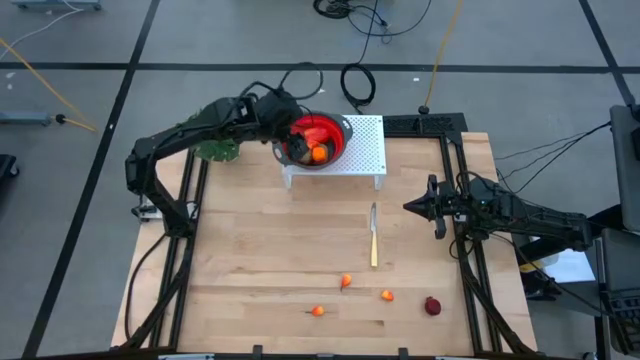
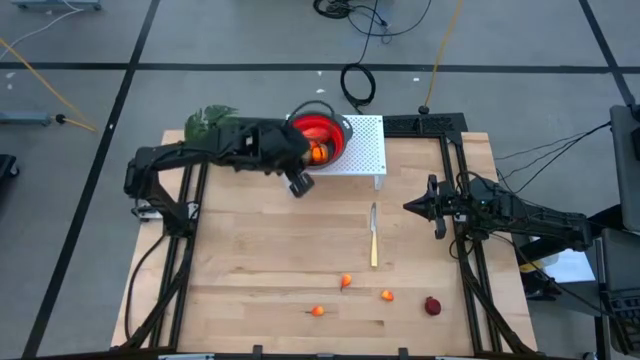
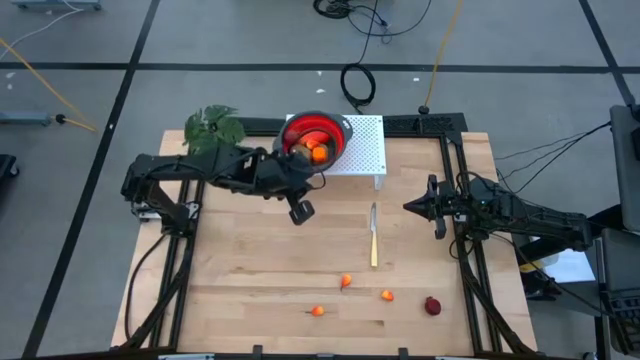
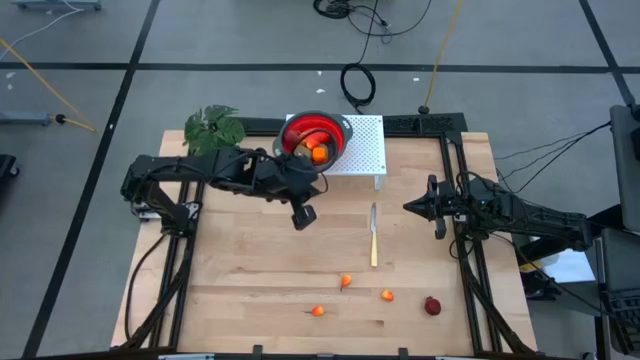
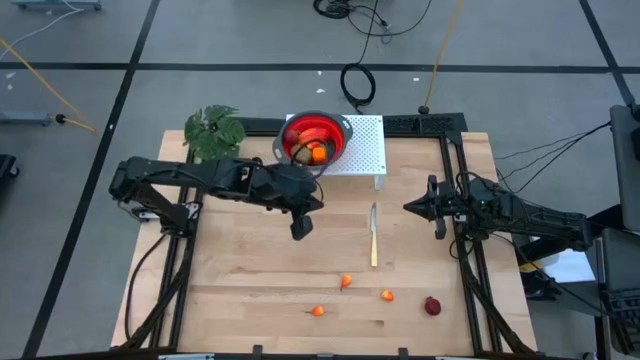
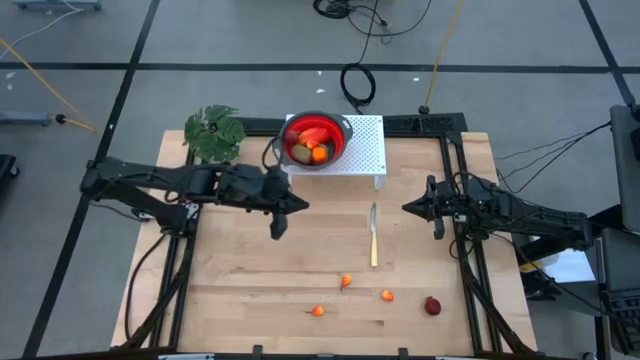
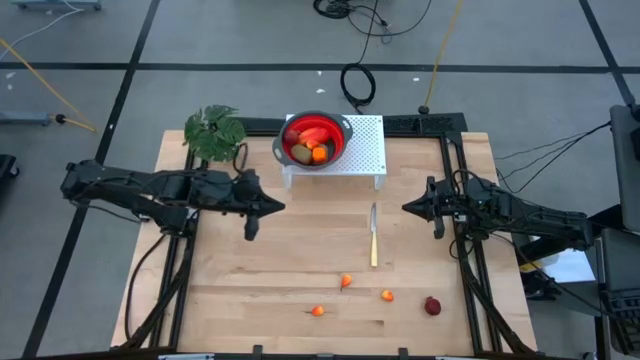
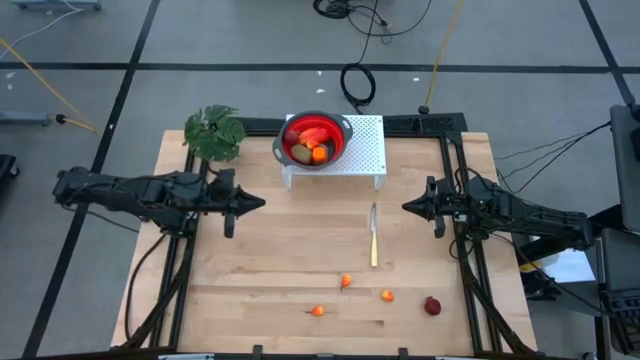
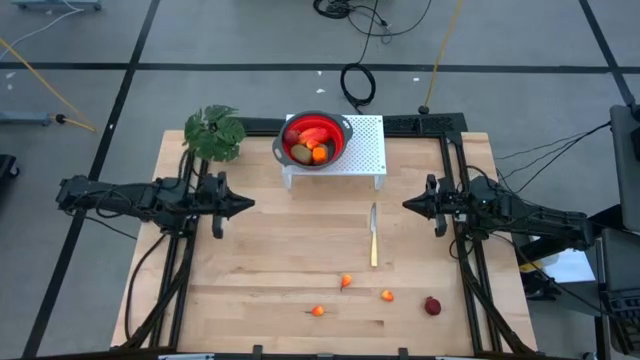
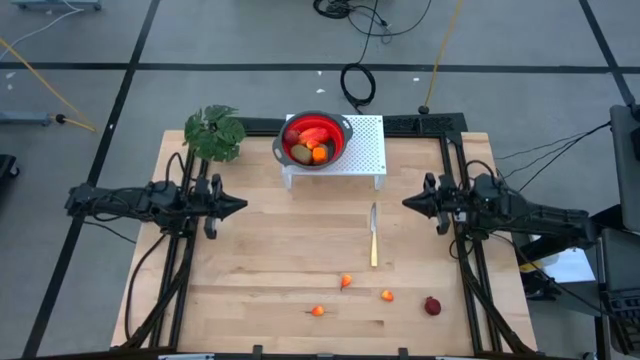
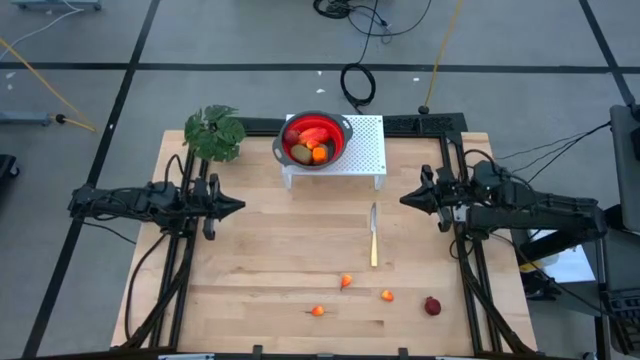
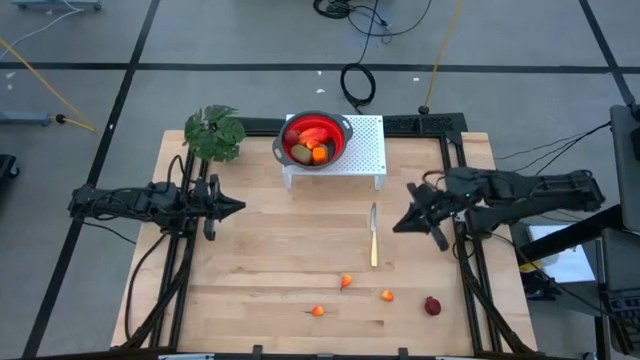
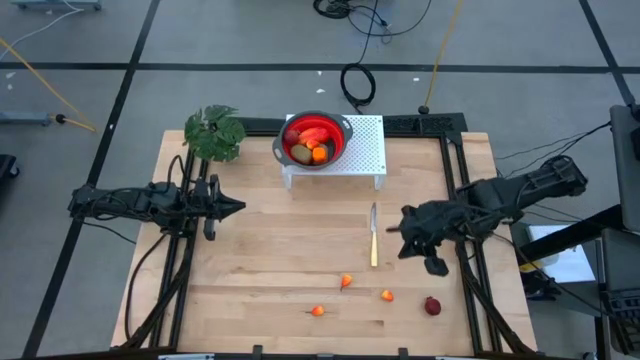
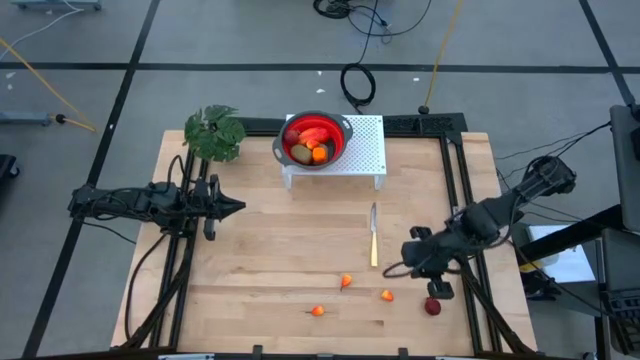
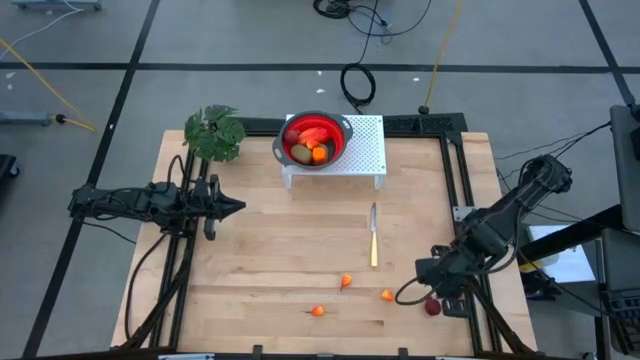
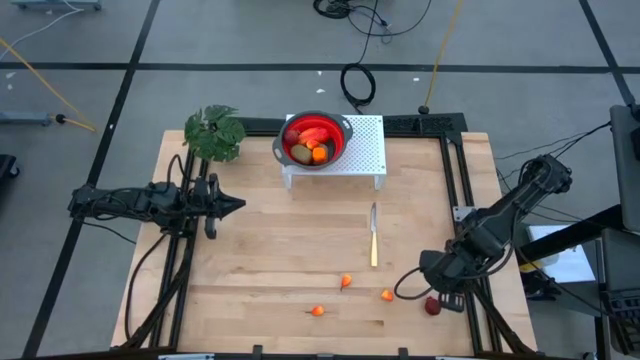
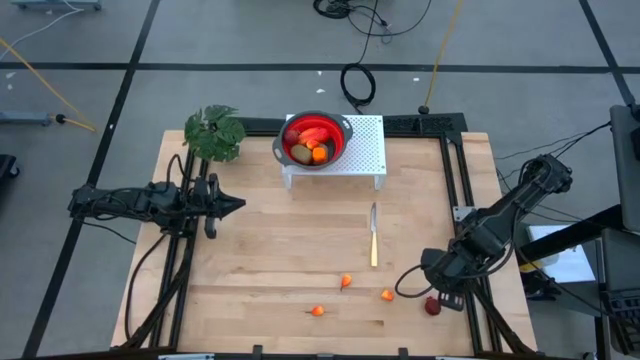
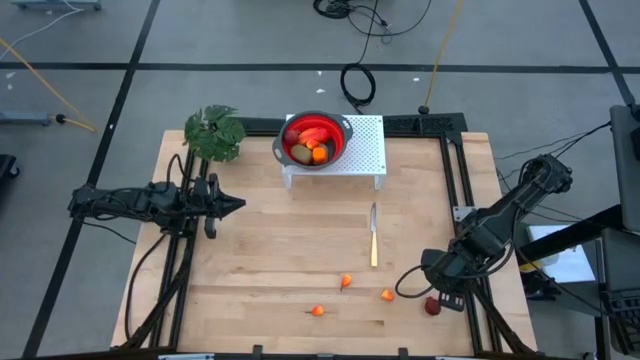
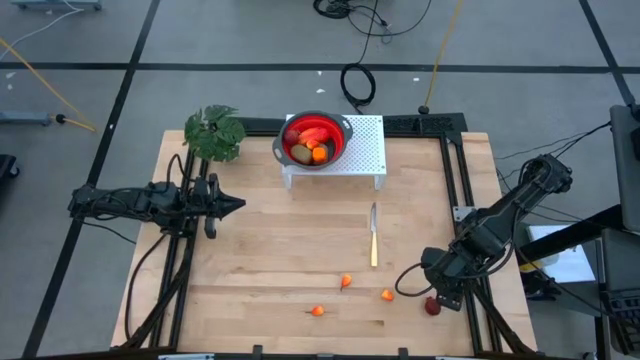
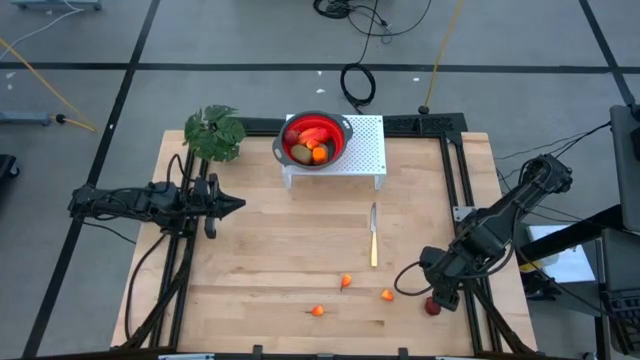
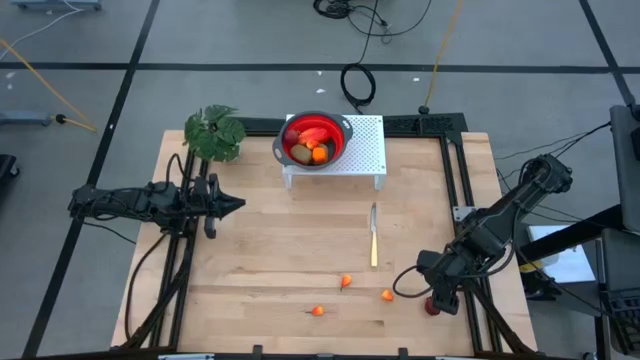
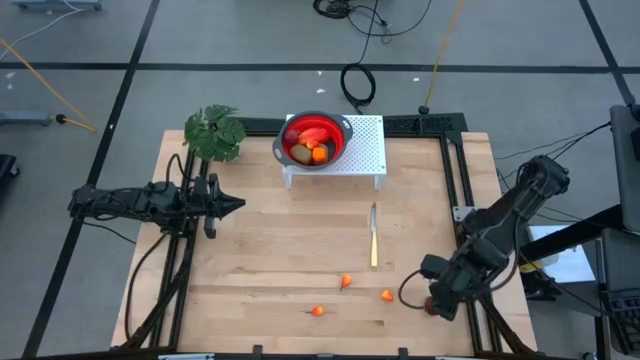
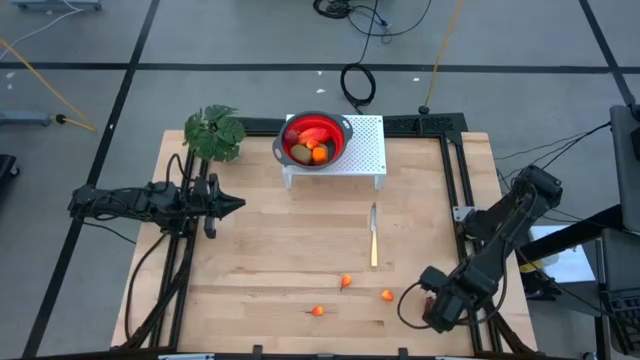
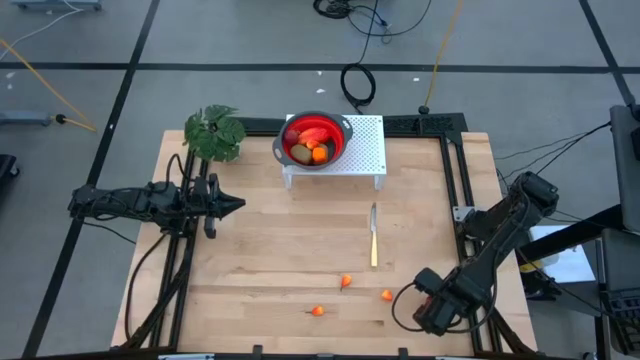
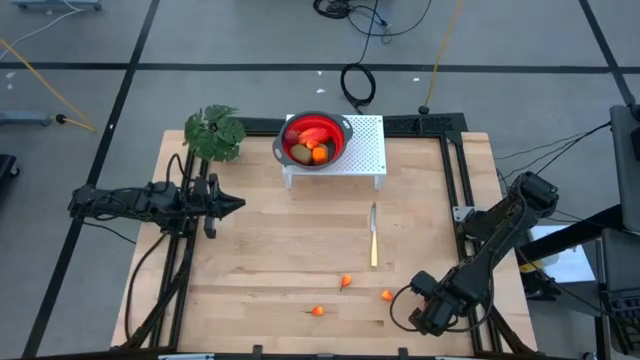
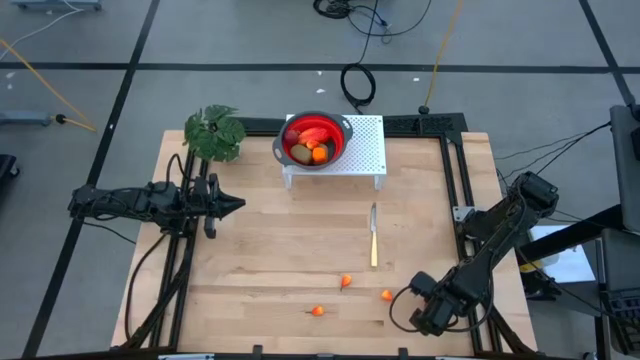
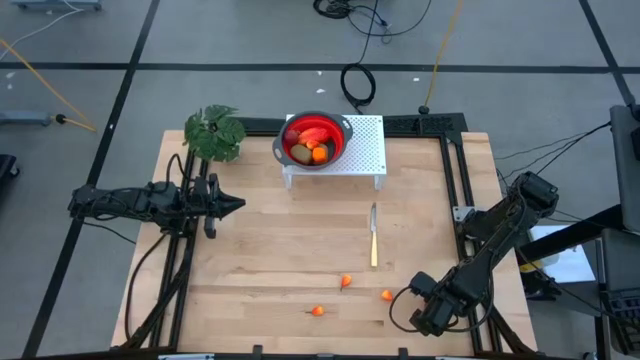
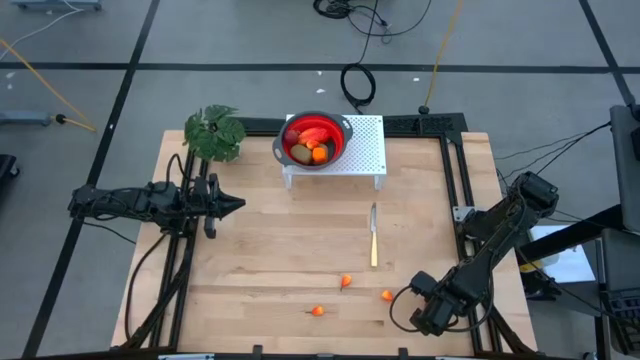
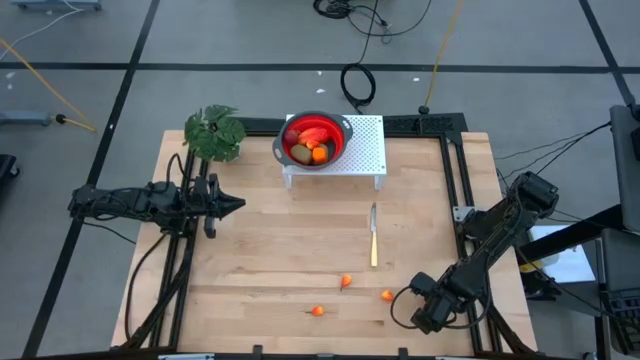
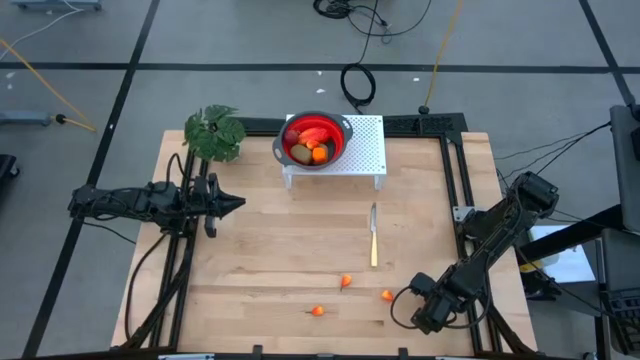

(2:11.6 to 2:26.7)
Task: Pick & Place Fruit
Put the red pomegranate into the red strainer bowl on the shelf
